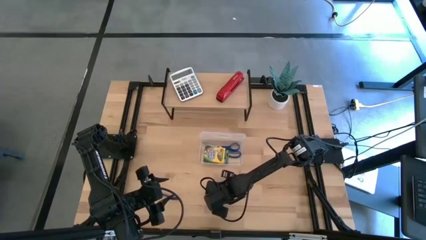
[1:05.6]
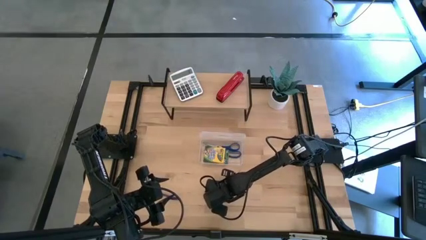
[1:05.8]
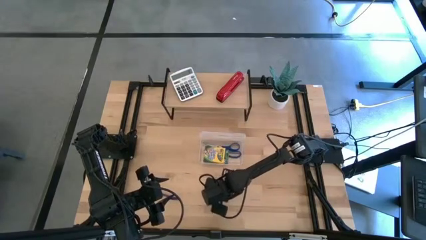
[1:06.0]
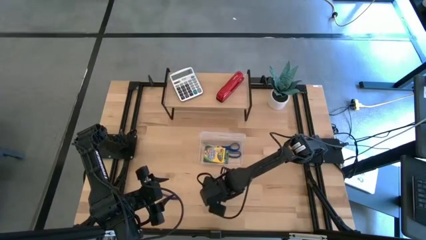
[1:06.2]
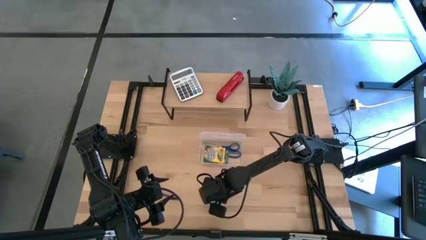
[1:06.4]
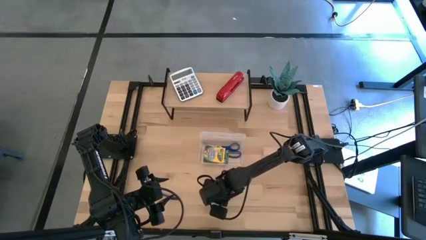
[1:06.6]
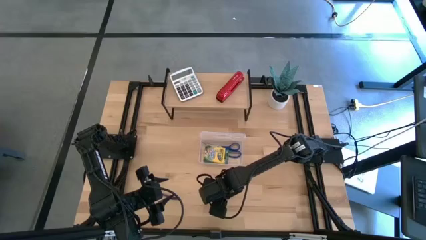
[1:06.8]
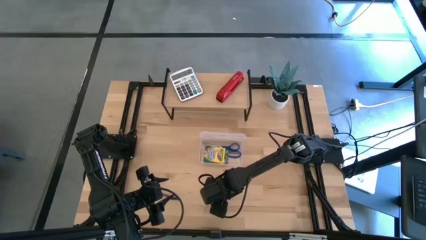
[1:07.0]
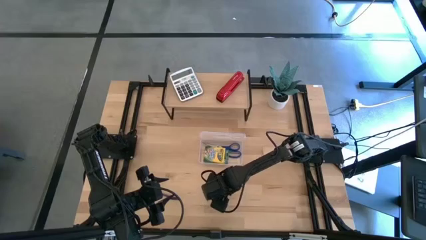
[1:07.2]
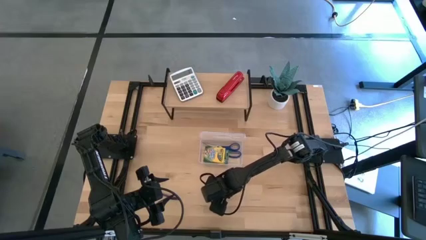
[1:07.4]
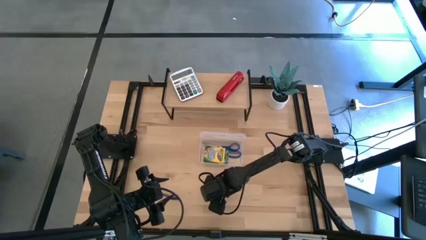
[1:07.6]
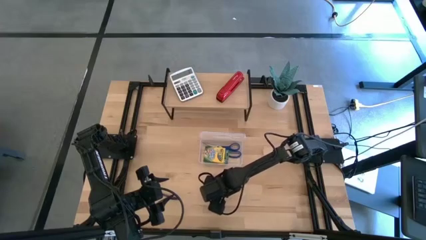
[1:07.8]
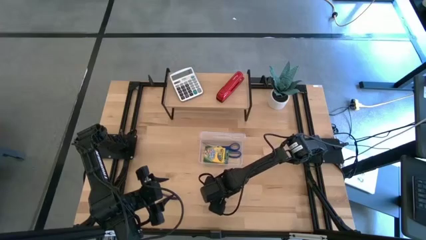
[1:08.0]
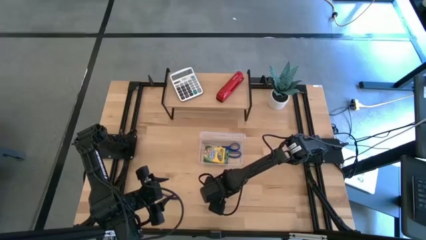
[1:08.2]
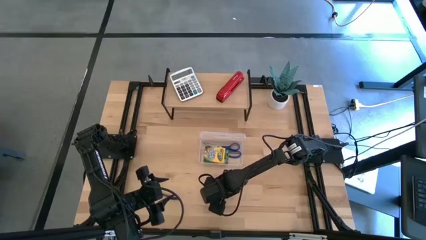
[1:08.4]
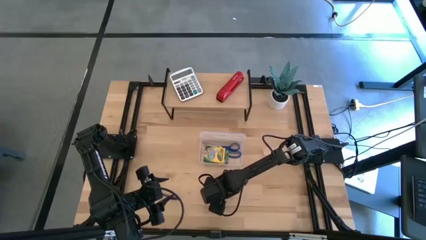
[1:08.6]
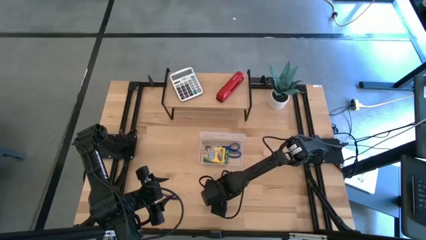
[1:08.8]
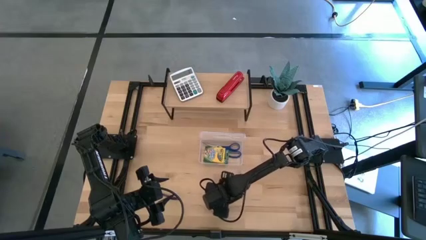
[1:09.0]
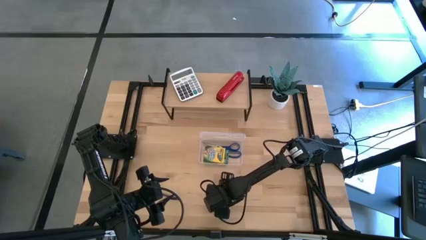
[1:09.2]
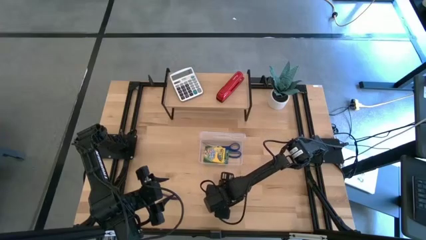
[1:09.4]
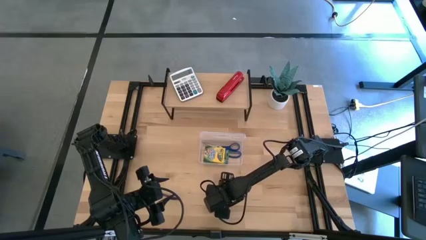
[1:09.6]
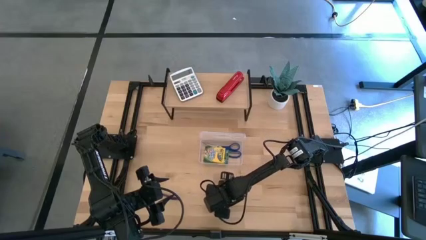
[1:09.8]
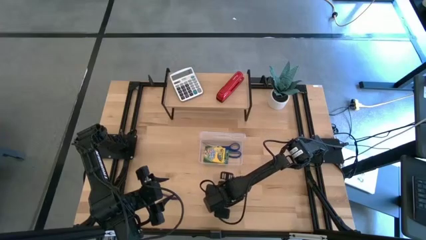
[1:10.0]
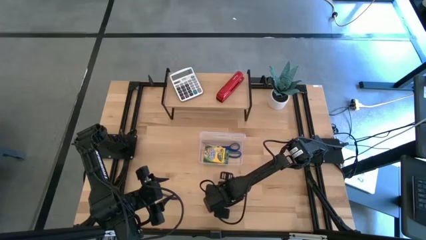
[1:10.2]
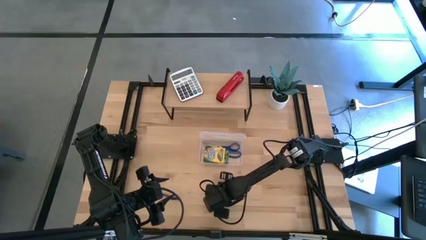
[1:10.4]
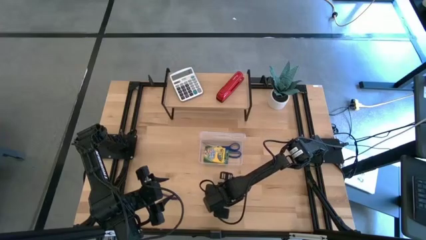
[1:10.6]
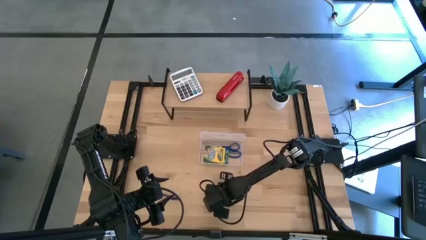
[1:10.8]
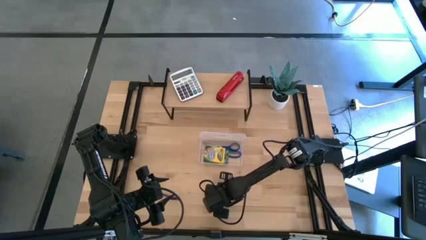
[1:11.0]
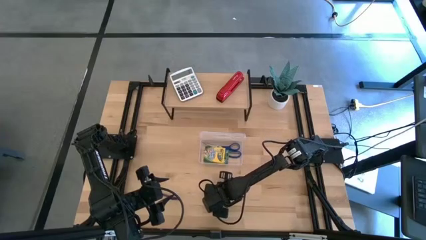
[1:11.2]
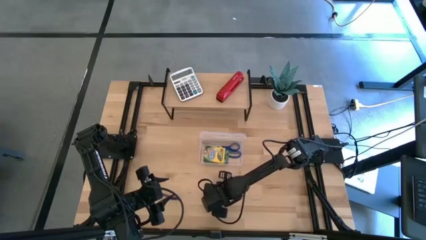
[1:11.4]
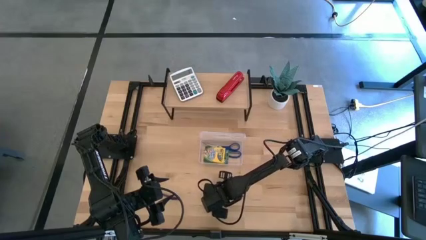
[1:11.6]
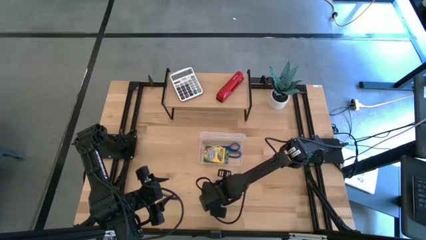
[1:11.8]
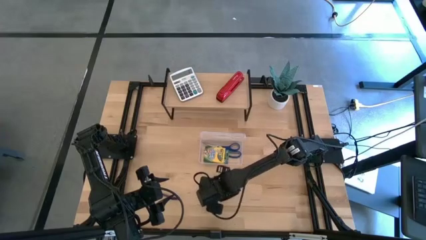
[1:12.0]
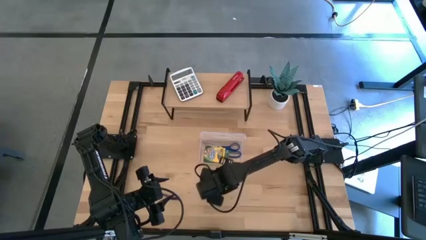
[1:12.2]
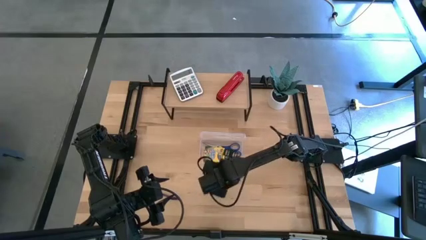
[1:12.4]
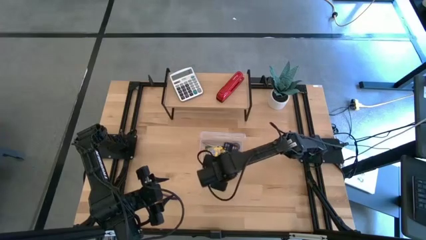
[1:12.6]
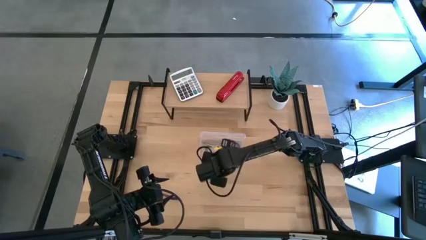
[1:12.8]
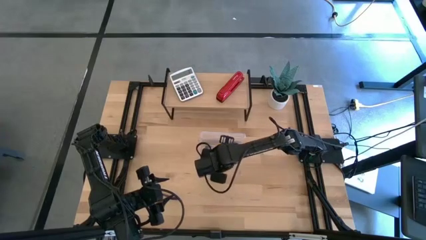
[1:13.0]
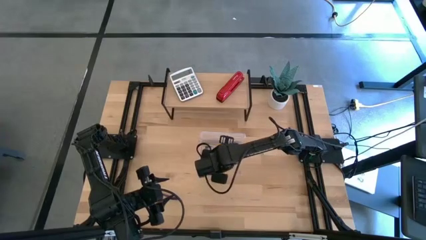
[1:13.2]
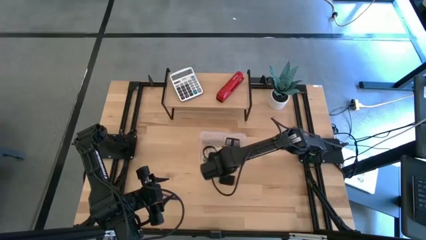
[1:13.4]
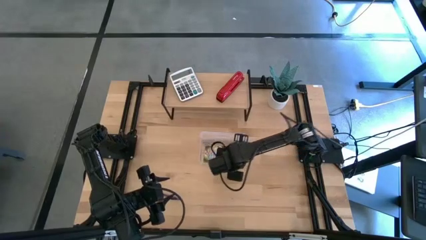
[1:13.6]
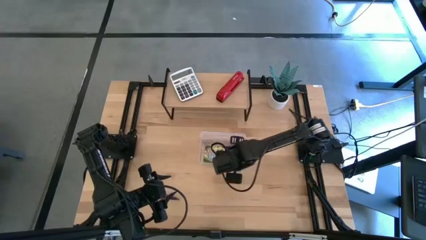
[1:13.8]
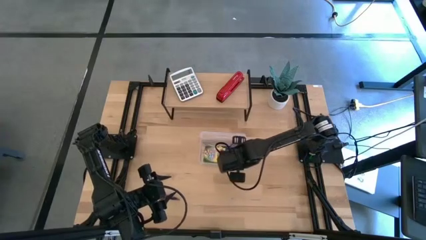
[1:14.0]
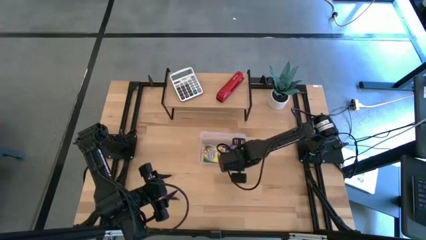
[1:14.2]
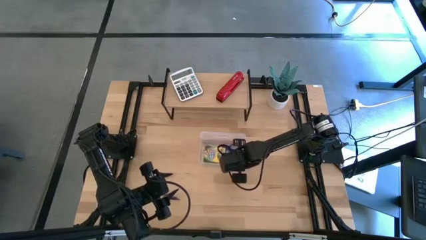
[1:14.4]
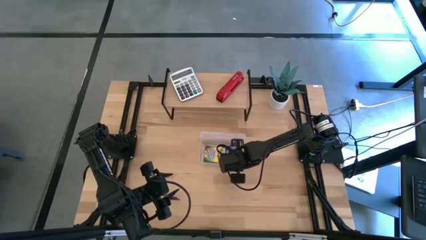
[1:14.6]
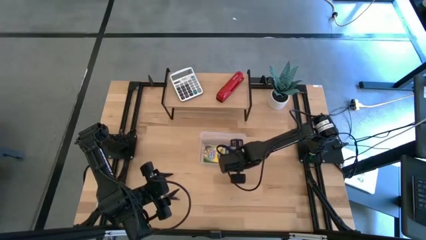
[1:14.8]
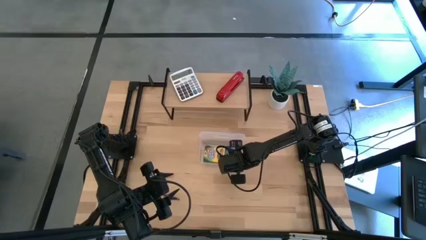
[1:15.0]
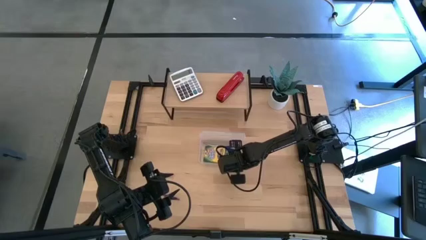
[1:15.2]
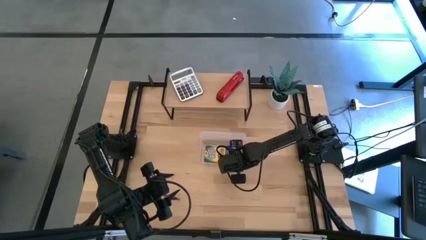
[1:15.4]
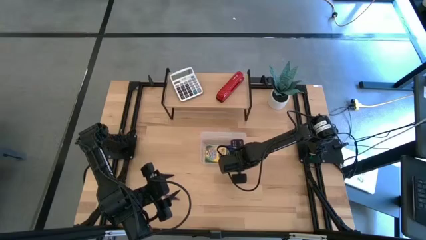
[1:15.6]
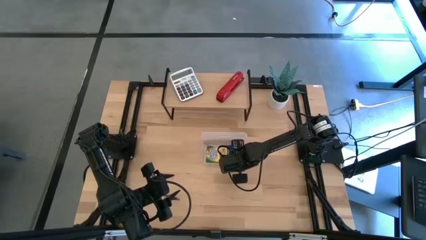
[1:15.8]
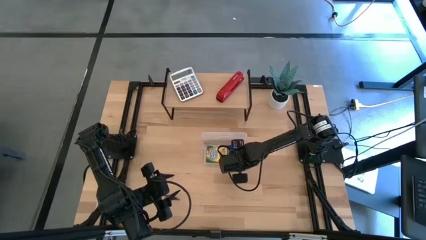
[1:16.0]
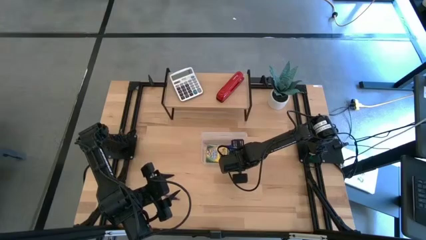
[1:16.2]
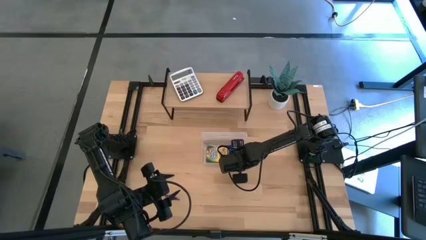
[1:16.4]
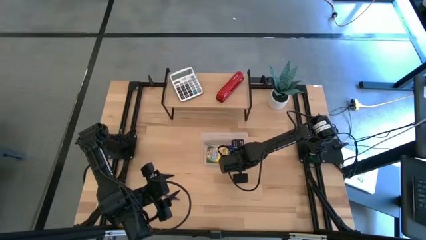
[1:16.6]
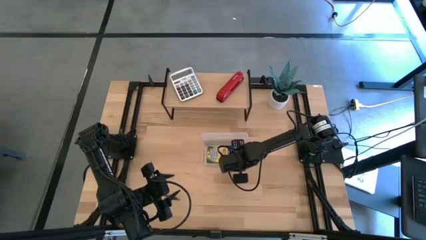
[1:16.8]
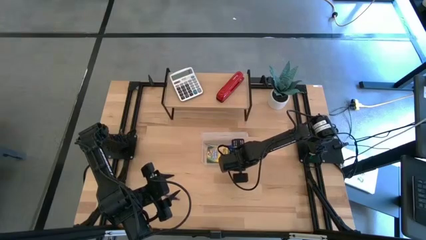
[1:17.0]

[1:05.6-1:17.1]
Task: Pack school essentials
Put the green eraser into the transparent supply box
